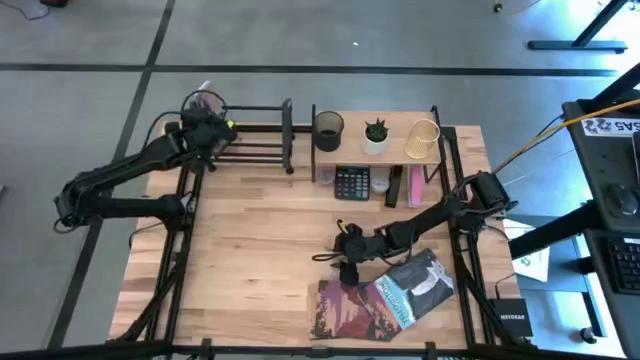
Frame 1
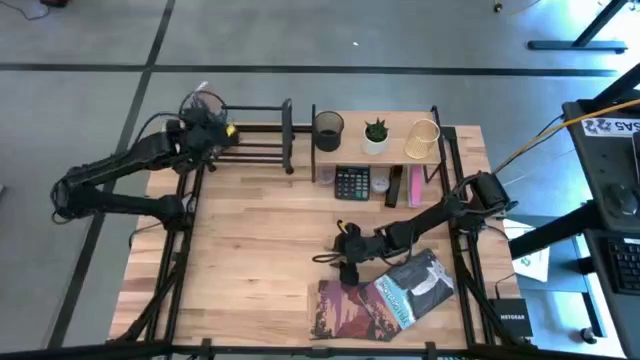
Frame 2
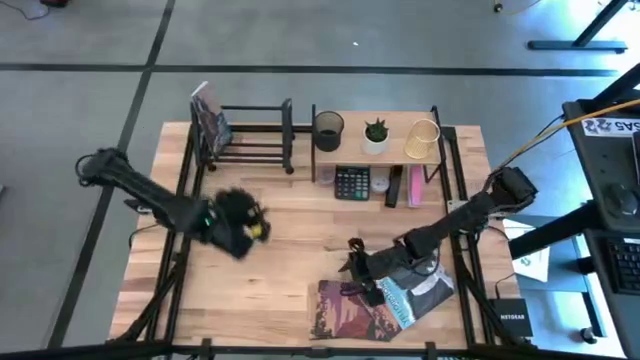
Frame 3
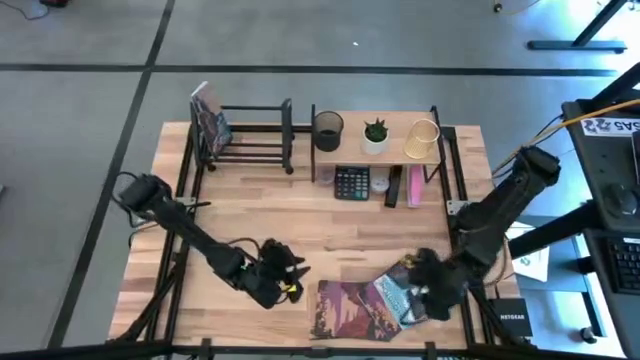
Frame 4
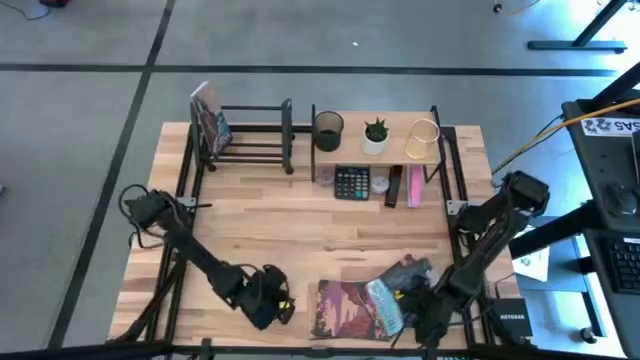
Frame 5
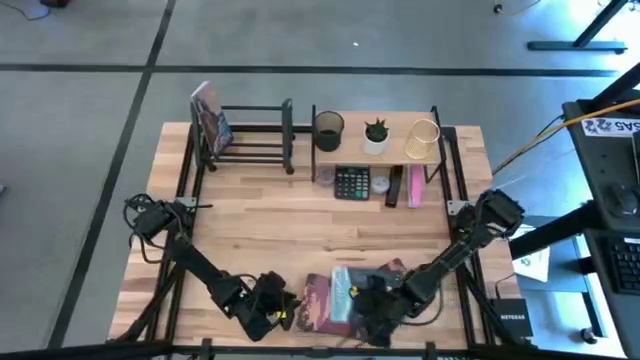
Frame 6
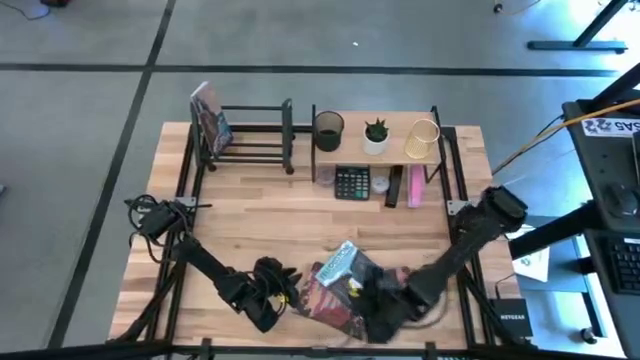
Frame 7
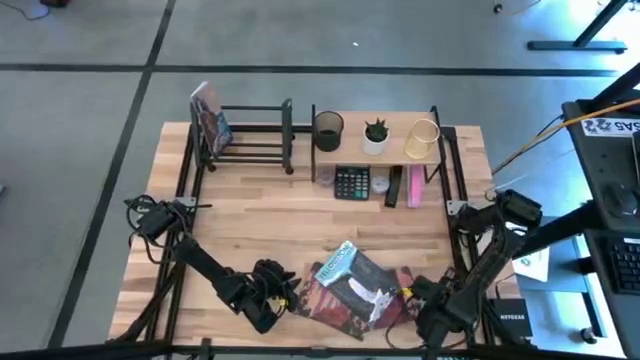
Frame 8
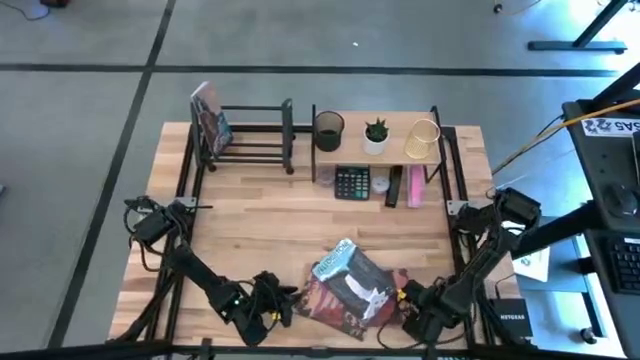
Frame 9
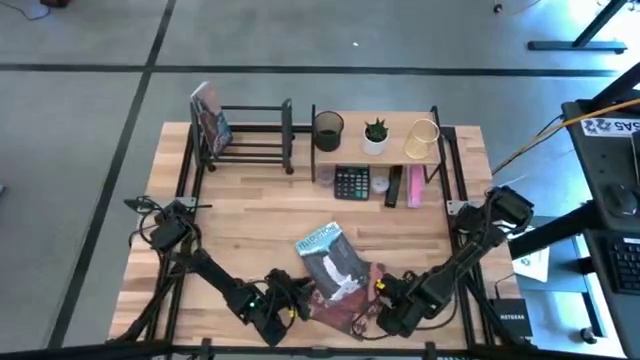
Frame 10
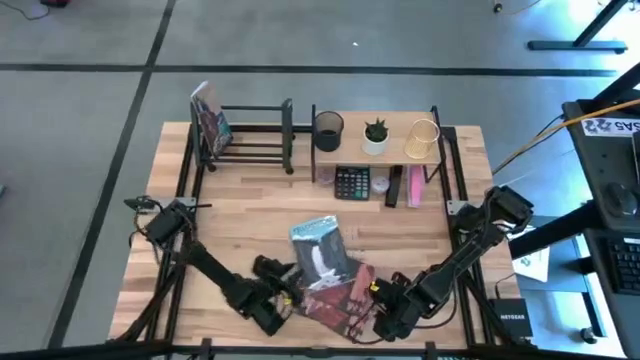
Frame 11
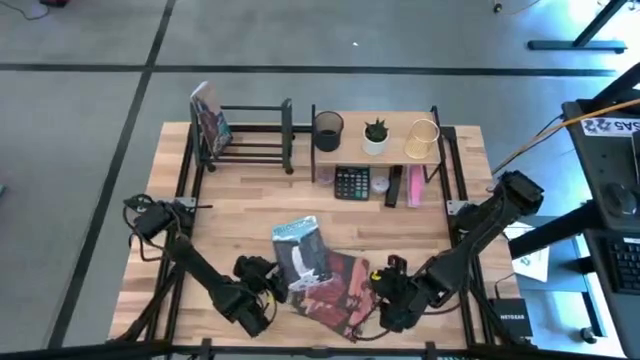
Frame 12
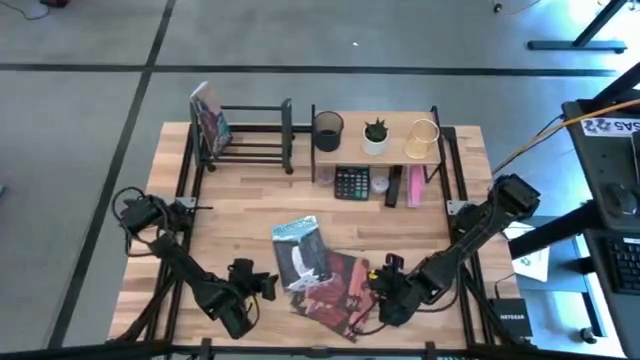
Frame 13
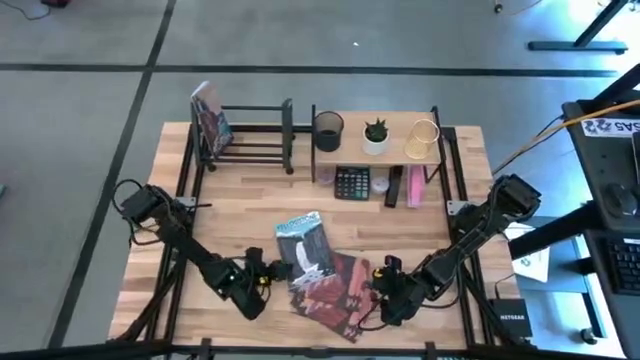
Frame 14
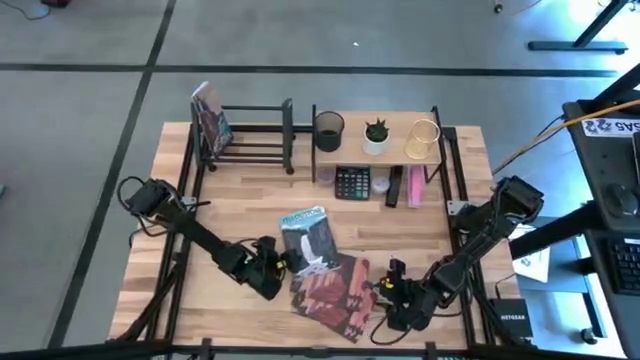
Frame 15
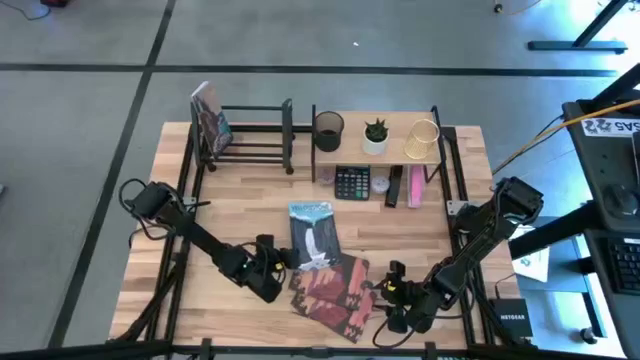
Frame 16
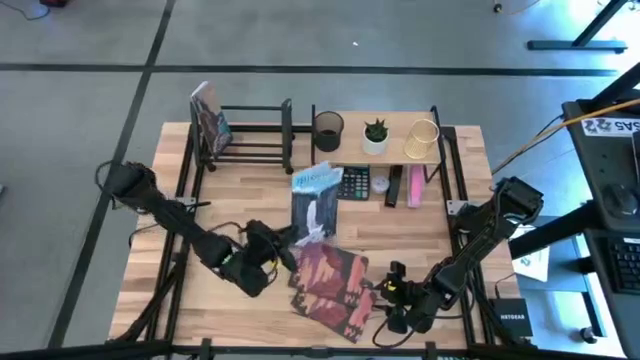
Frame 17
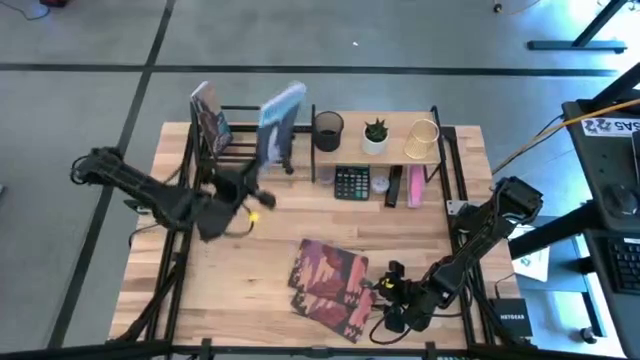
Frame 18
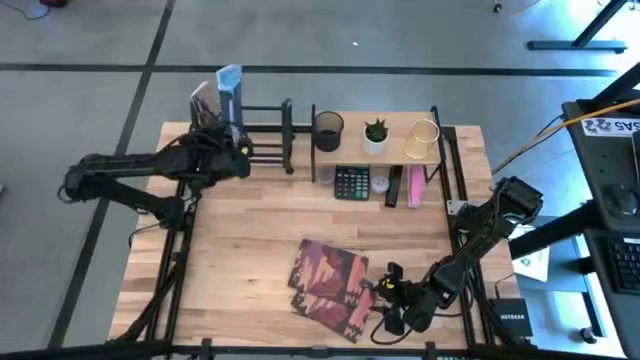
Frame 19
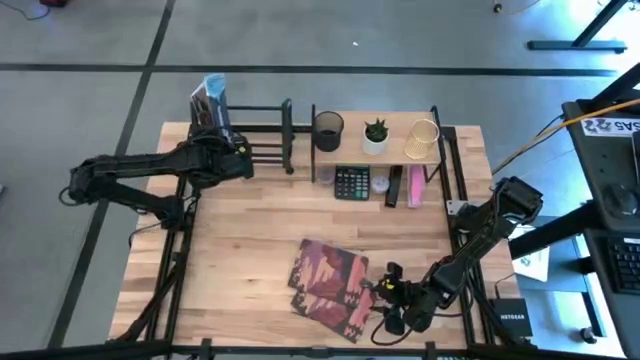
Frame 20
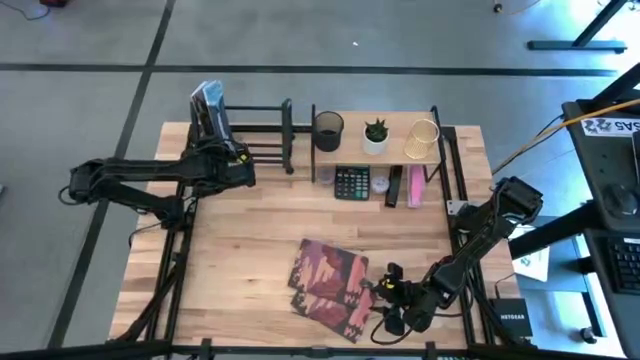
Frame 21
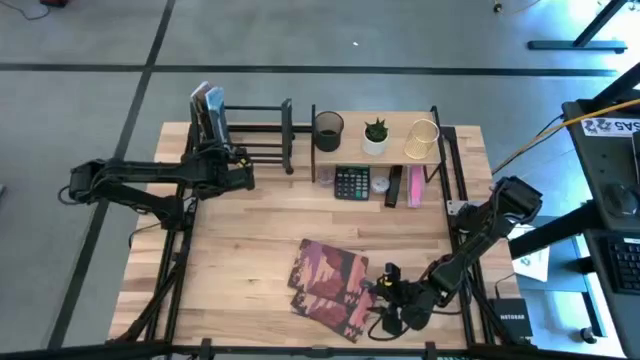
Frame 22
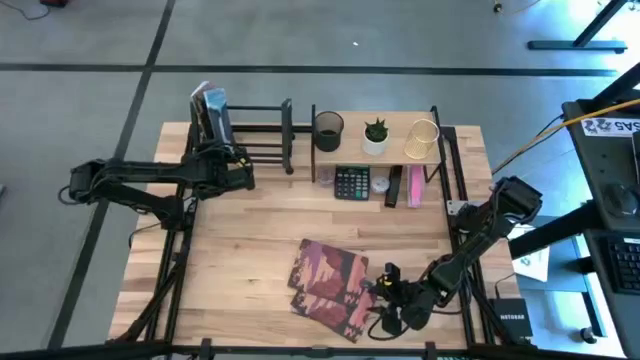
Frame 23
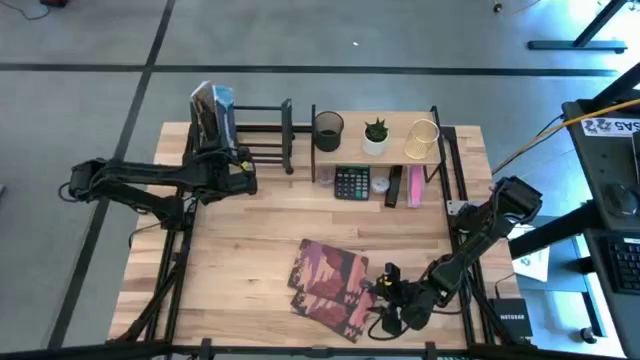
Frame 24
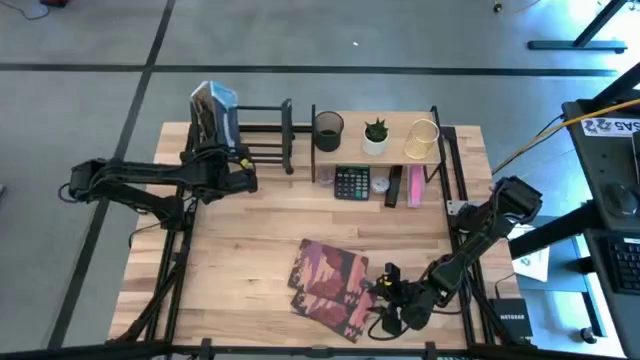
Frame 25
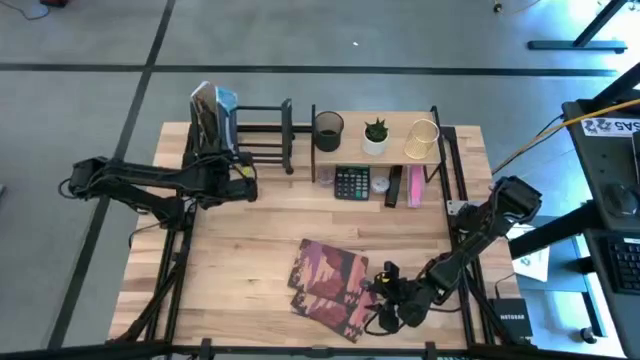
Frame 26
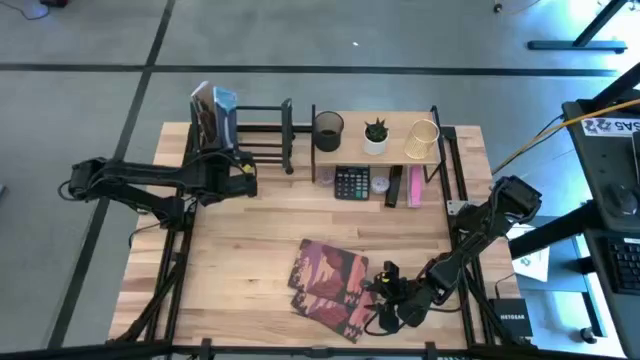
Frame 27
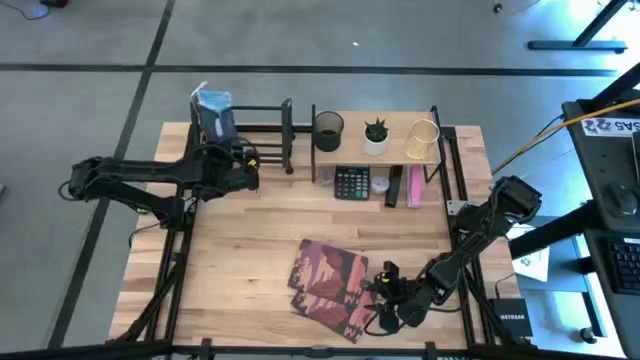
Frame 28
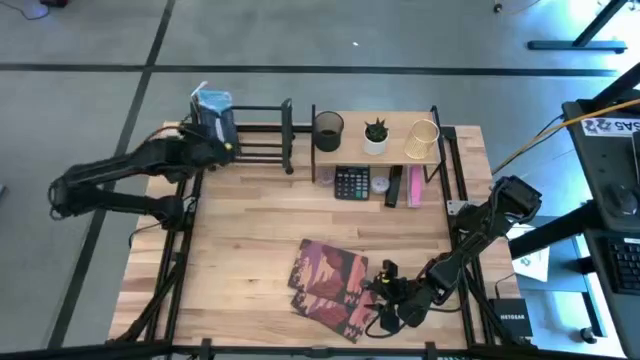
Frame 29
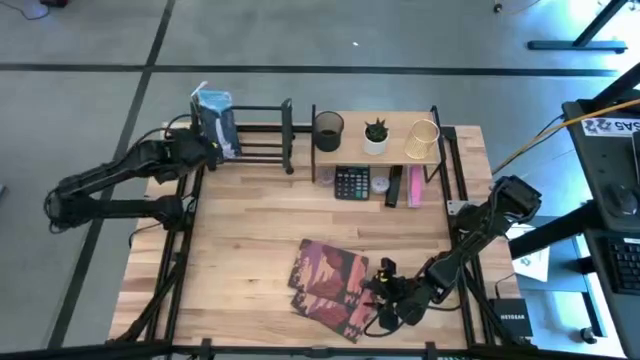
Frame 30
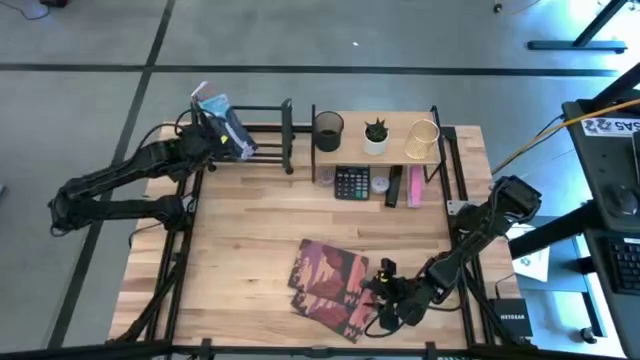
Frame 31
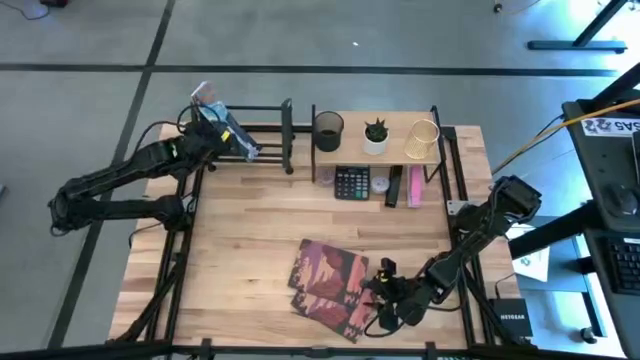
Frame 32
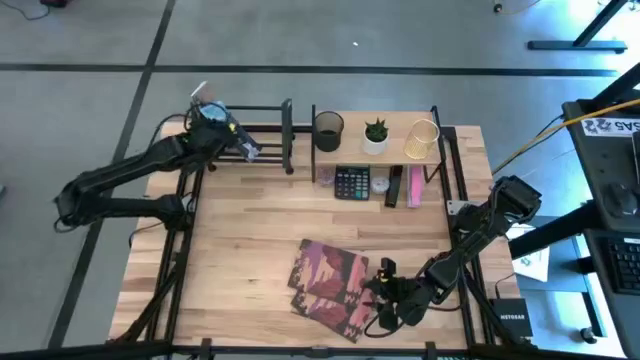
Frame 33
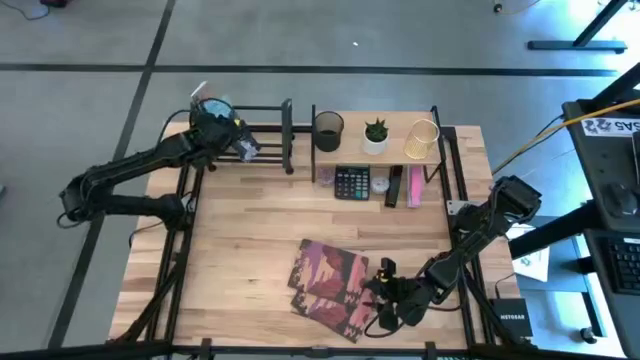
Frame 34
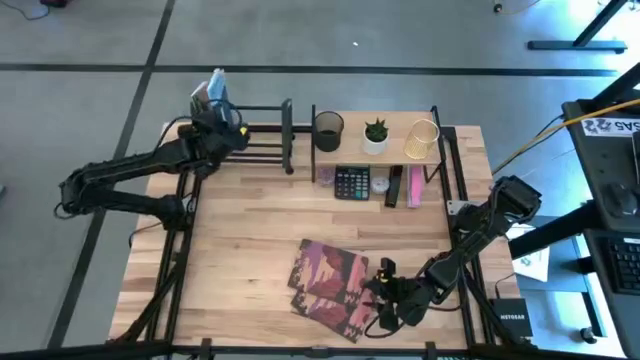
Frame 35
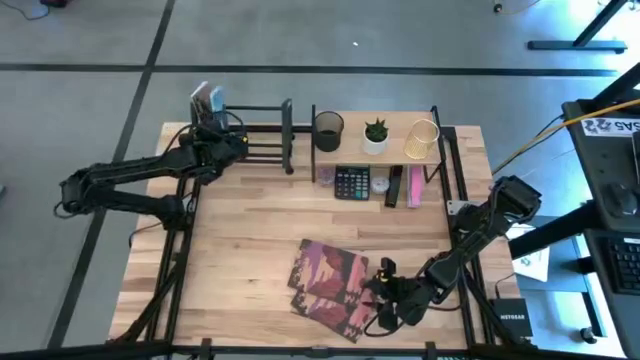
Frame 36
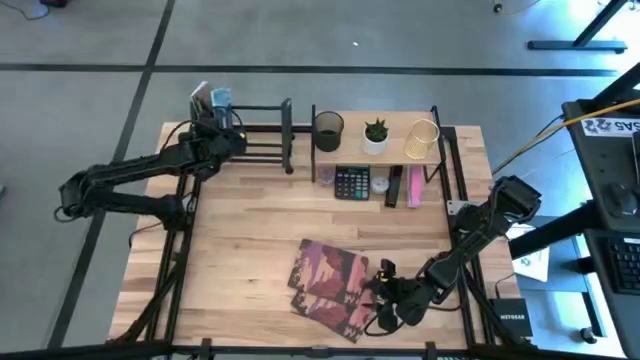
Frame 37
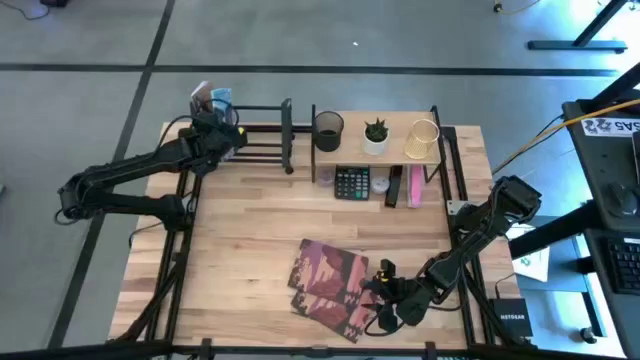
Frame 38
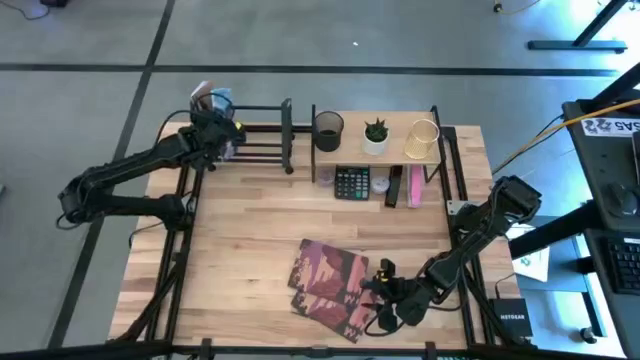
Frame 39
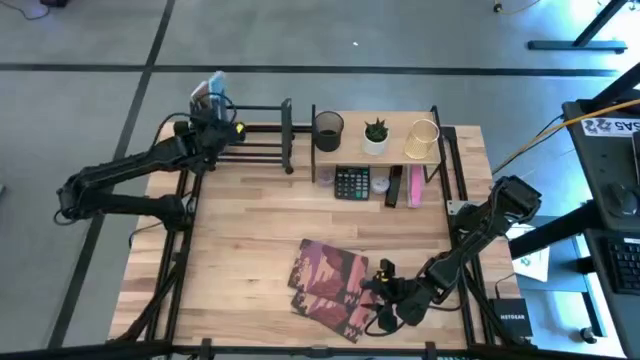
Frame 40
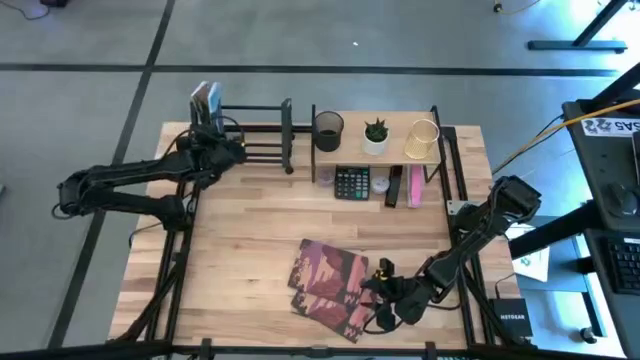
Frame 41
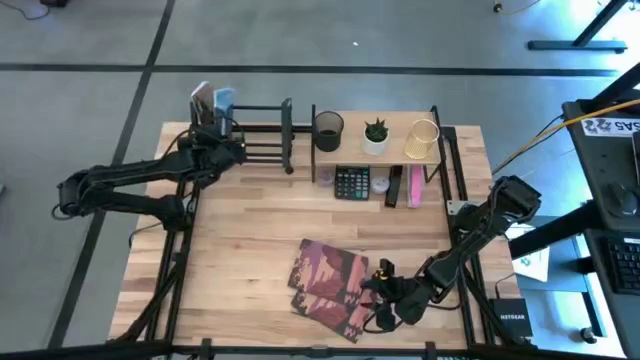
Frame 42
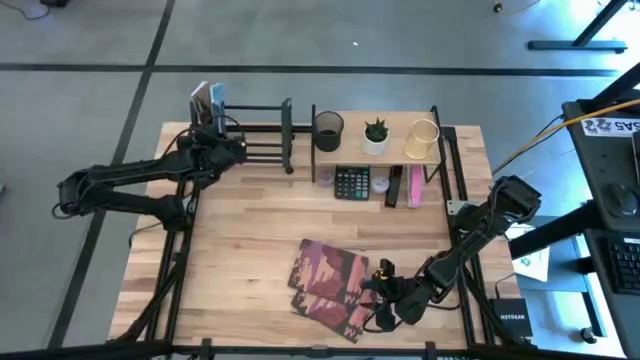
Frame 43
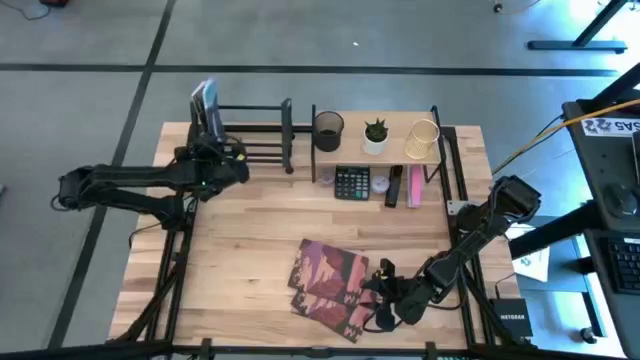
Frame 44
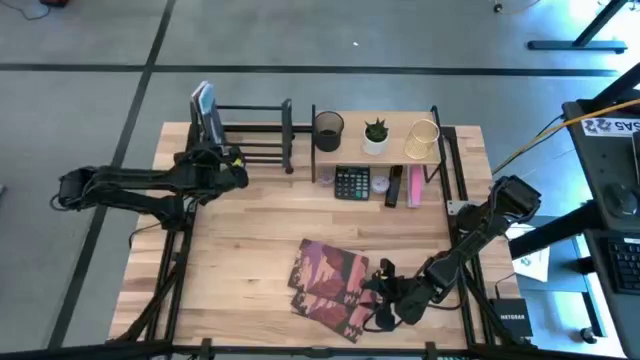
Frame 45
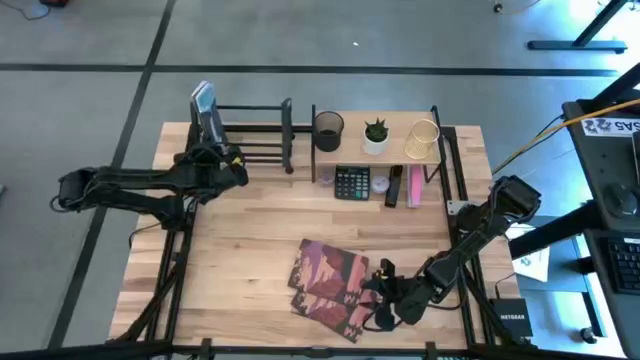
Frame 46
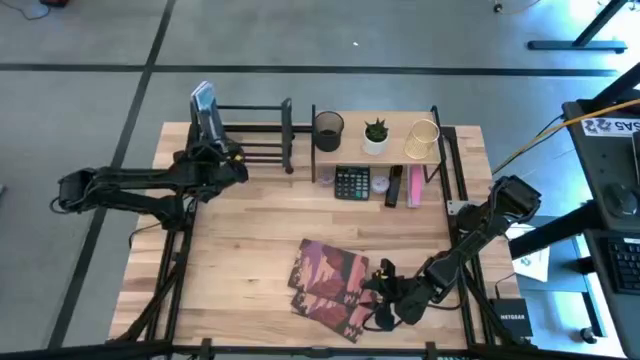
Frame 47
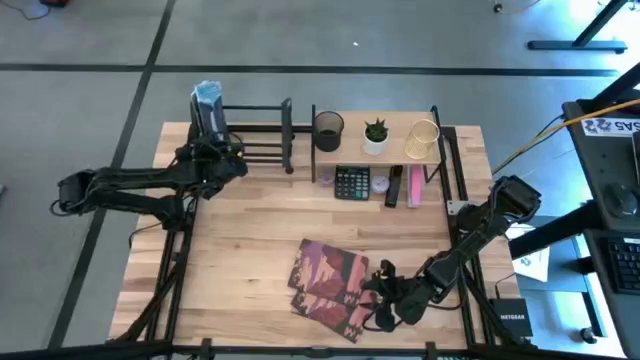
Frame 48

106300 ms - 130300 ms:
Task: Stock shelves
Put the blue book on the book shelf
